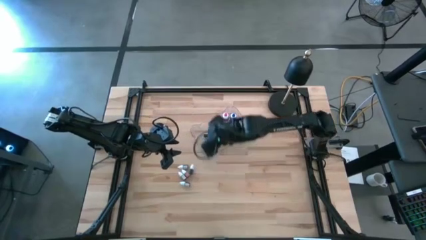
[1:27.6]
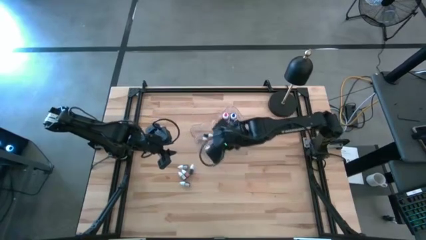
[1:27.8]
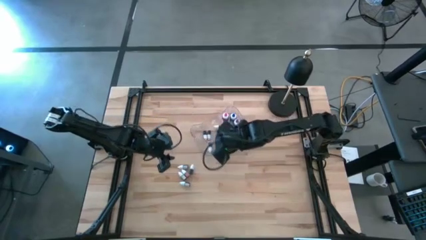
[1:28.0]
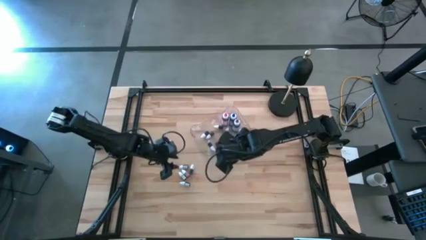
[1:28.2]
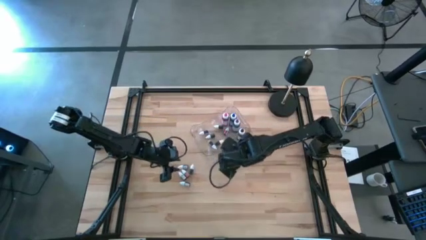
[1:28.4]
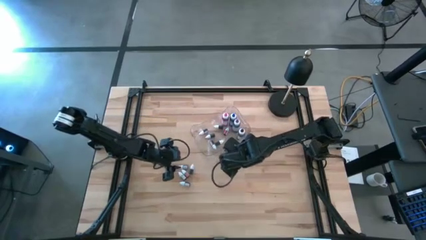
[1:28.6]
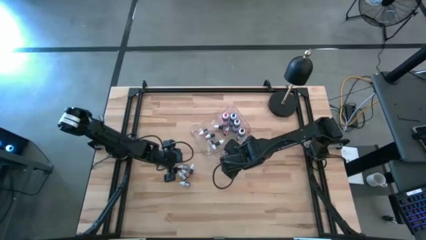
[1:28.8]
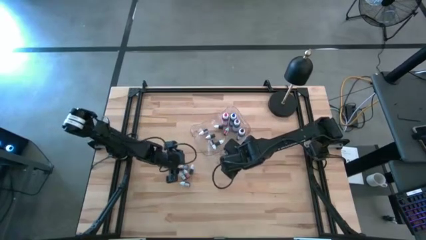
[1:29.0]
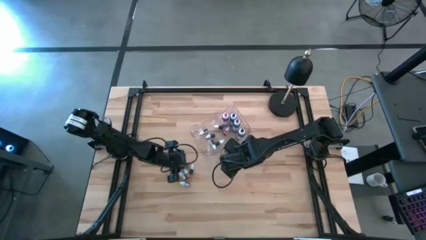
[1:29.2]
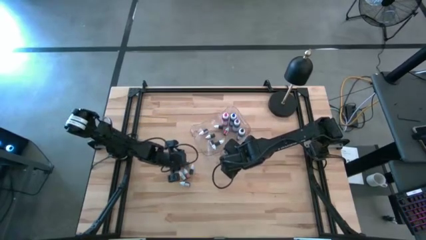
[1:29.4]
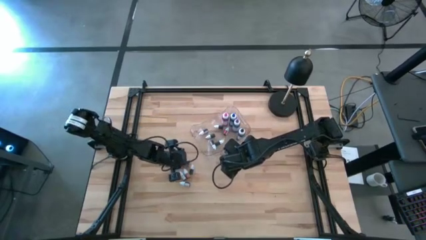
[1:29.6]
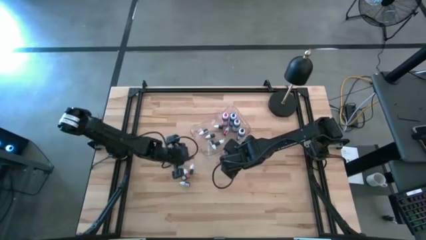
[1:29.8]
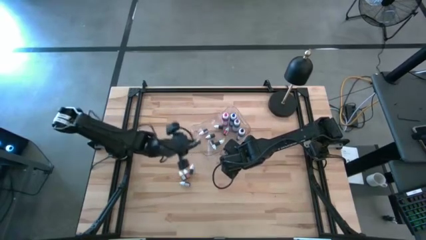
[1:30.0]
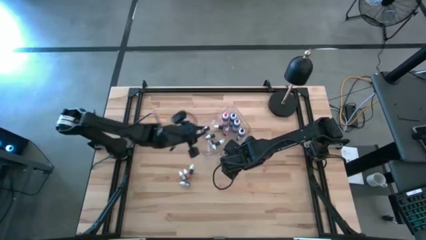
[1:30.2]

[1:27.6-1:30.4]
Task: Pick & Place food coloring
Put the left small green food coloring bottle into the transparent bin

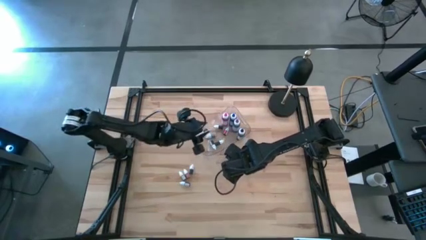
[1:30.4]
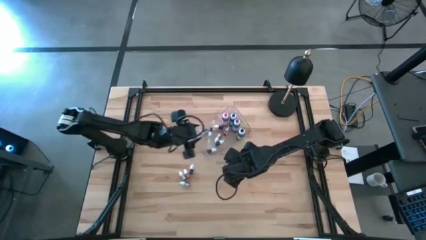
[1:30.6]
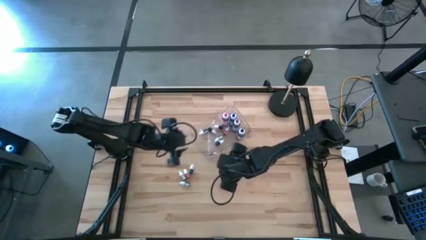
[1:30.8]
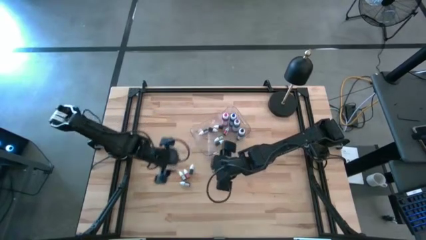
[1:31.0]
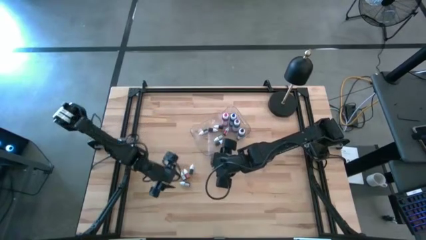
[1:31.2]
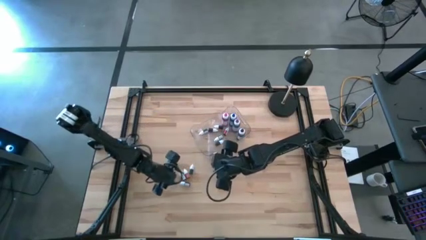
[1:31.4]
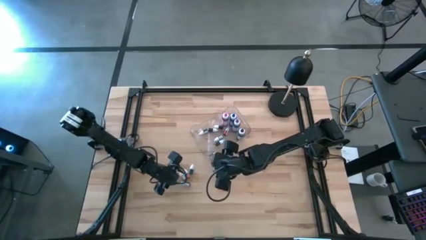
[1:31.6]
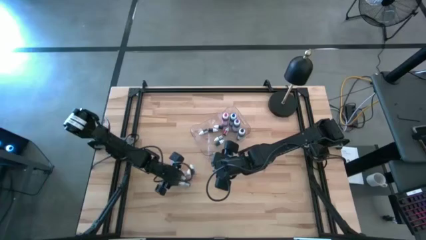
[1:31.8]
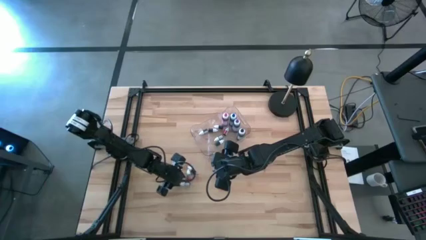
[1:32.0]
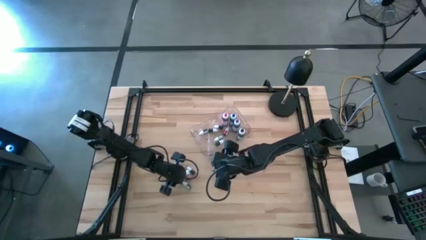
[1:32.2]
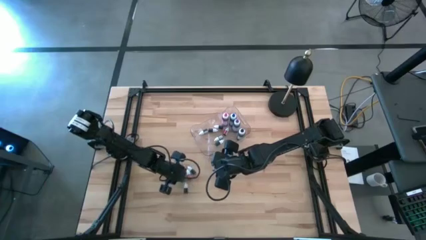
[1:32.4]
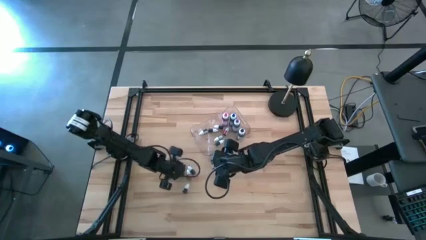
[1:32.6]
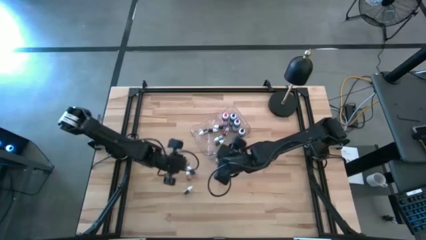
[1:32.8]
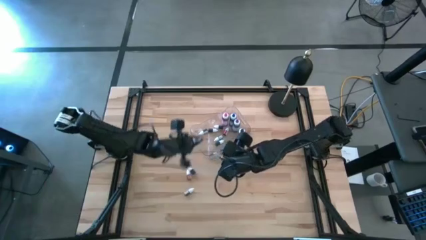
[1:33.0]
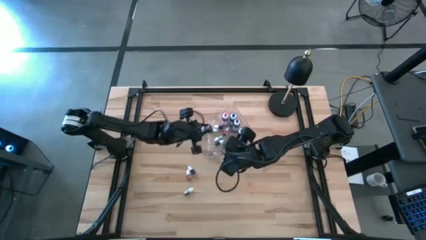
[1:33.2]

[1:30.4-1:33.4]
Put the small light green food coloring bottle into the transparent bin

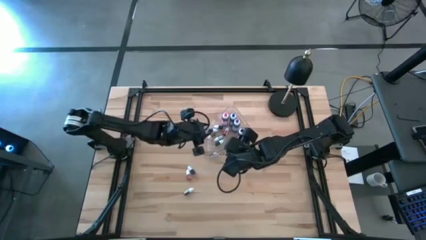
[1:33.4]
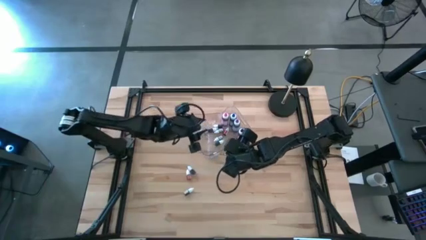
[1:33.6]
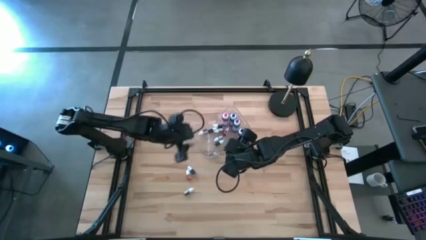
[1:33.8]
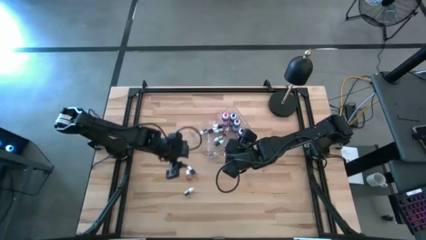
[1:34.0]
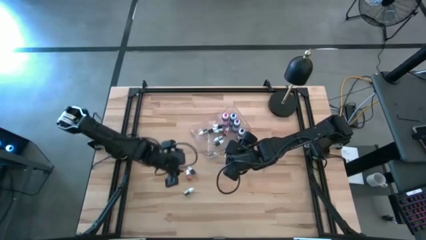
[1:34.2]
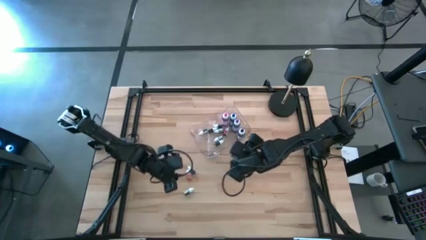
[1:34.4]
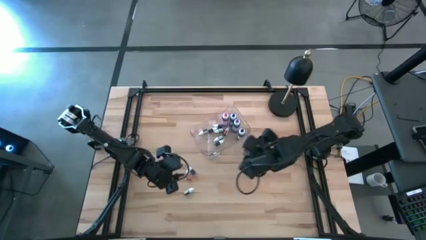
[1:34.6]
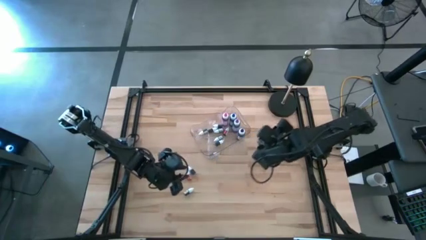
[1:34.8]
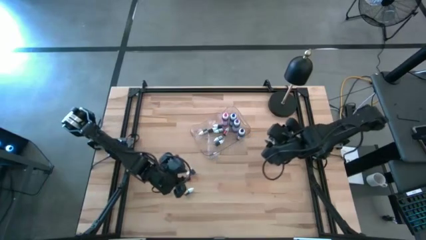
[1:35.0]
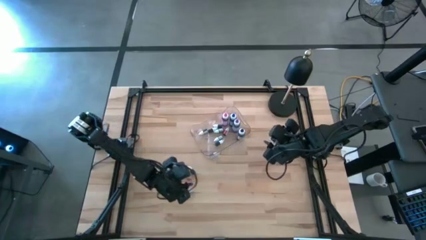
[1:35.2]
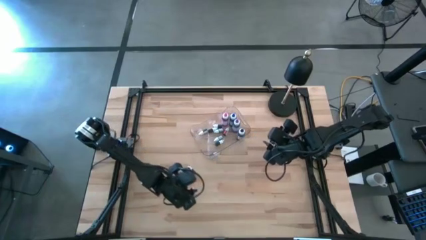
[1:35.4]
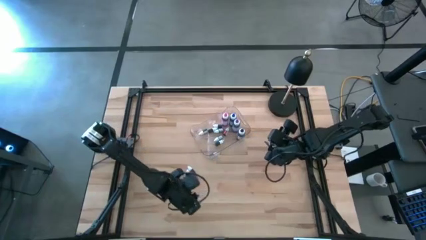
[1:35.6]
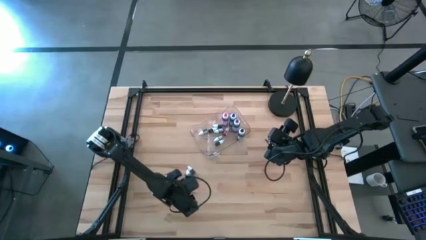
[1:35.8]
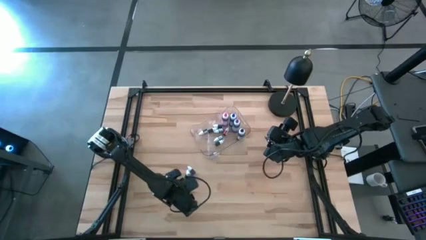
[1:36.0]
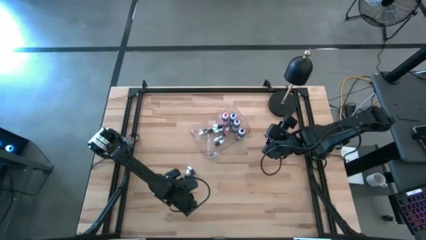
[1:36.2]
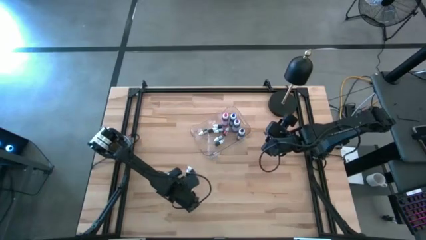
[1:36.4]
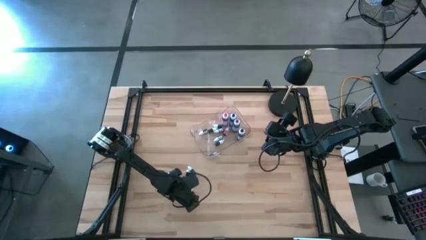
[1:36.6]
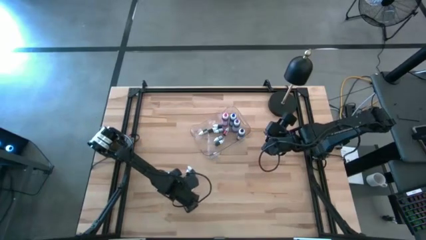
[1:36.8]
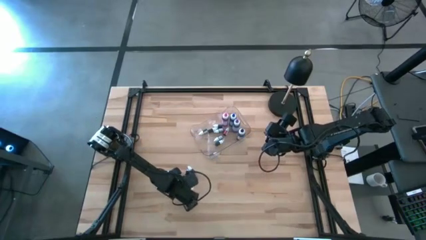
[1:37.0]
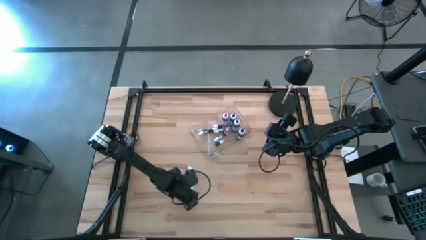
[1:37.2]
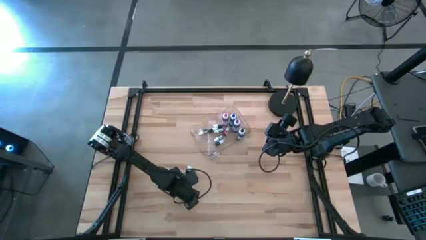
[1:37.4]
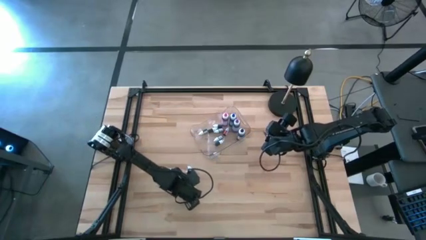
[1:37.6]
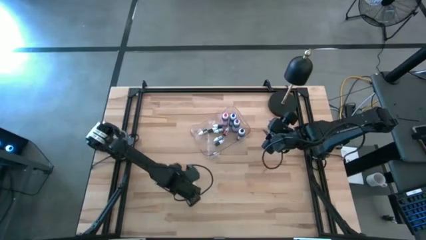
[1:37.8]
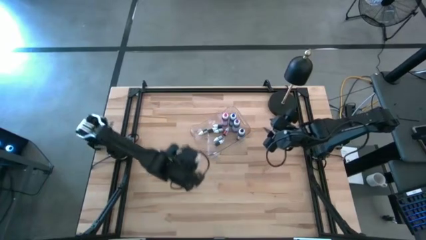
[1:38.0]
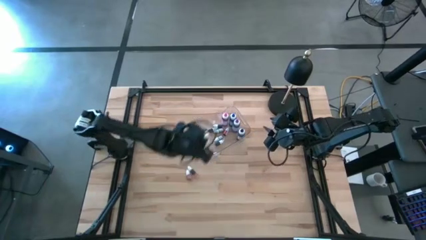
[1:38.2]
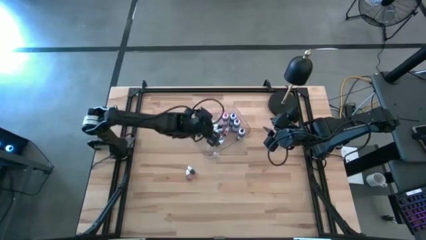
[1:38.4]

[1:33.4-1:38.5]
Put the small purple food coloring bottle into the transparent bin

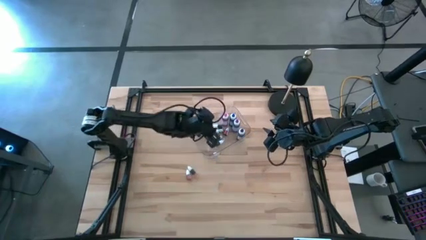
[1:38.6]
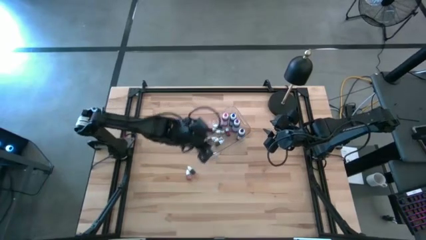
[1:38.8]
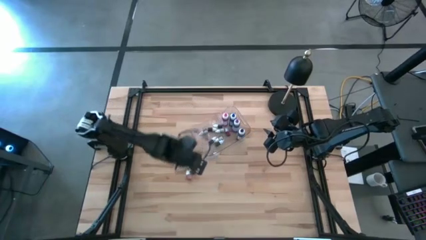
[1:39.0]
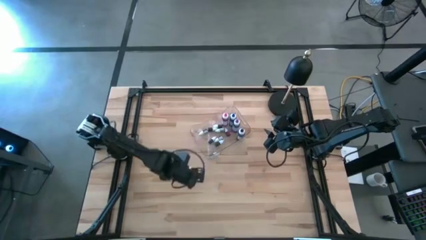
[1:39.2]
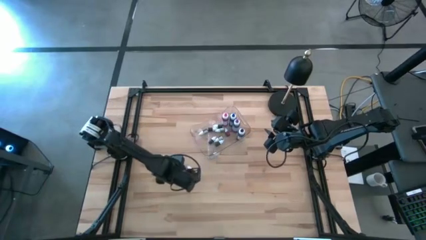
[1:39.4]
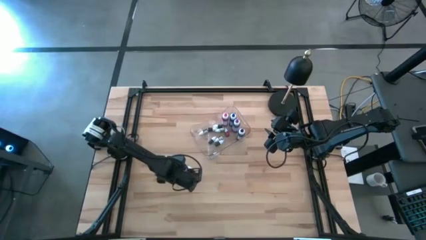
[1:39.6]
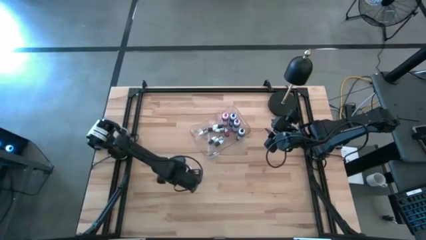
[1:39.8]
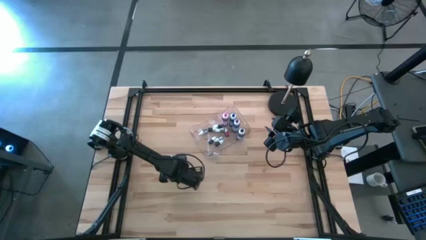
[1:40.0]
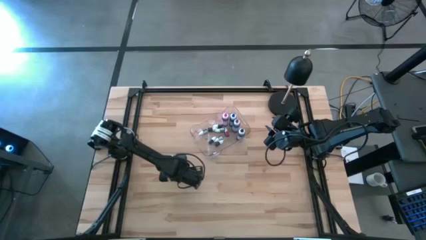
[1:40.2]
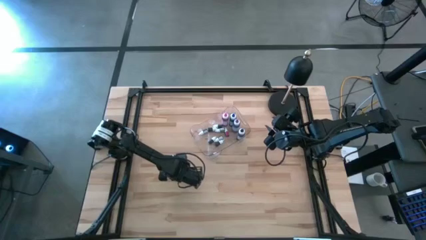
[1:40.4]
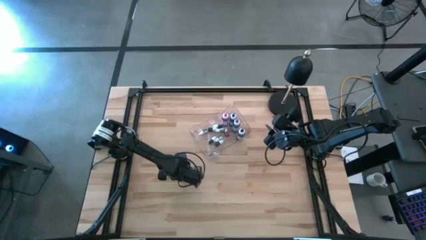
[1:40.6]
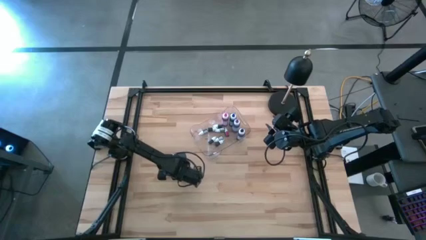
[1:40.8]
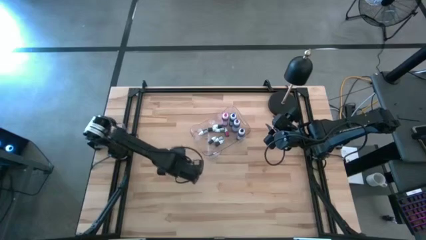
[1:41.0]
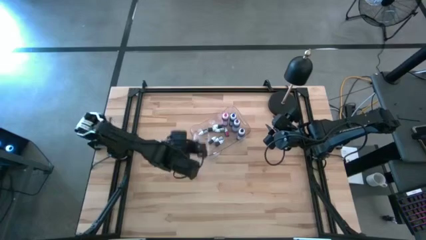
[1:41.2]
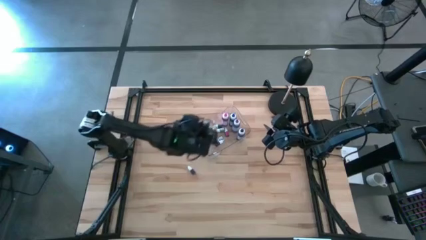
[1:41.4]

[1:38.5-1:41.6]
Put the red orange food coloring bottle into the transparent bin

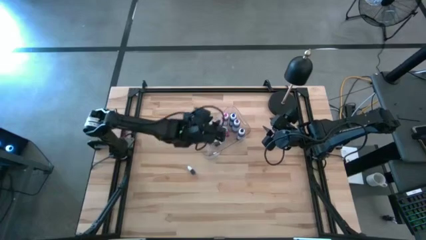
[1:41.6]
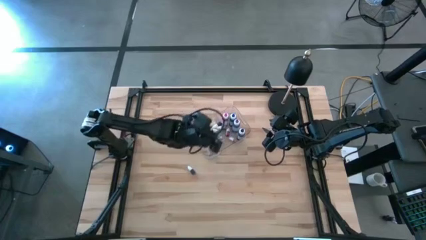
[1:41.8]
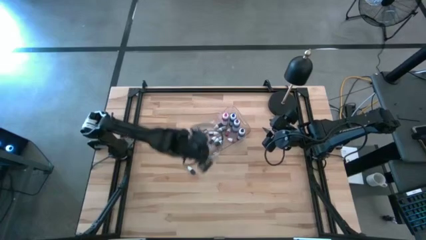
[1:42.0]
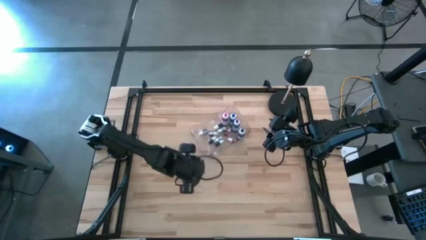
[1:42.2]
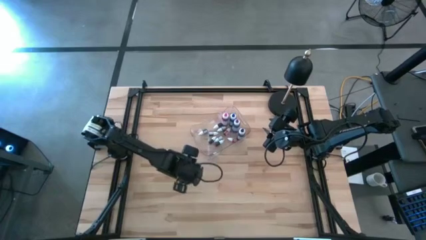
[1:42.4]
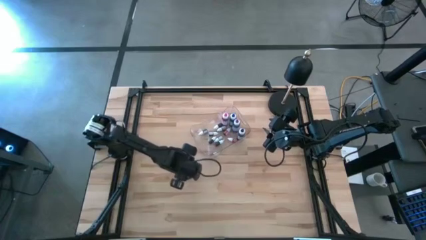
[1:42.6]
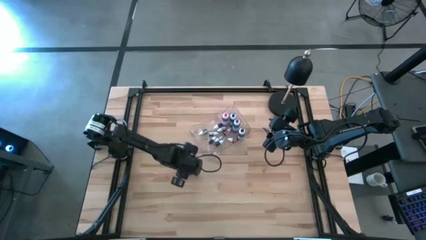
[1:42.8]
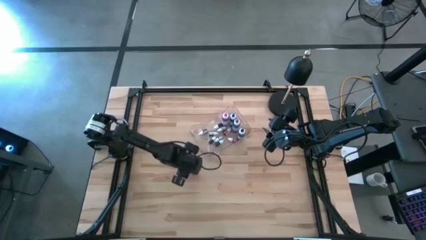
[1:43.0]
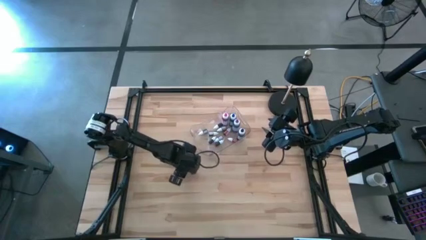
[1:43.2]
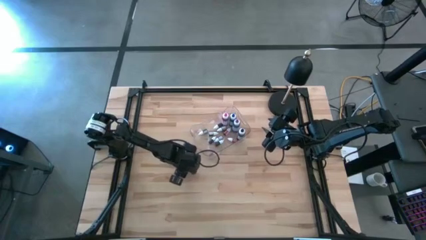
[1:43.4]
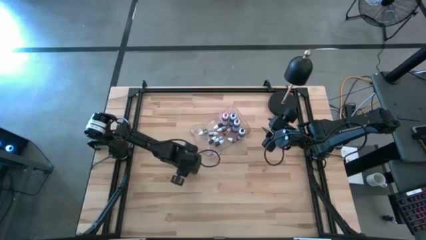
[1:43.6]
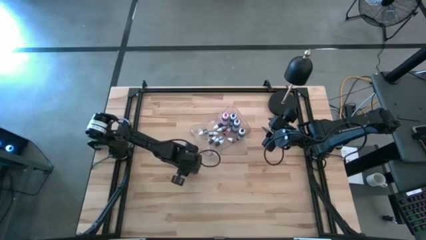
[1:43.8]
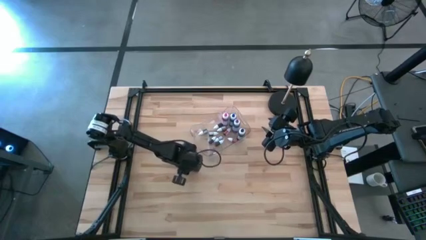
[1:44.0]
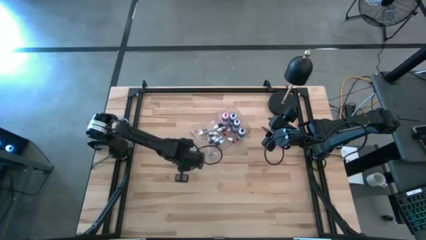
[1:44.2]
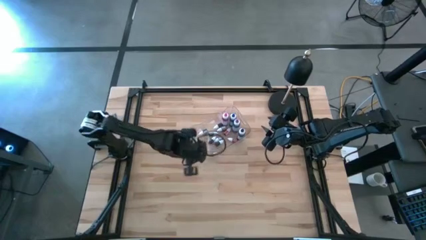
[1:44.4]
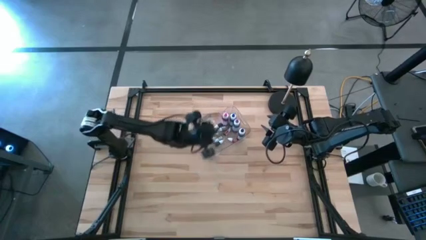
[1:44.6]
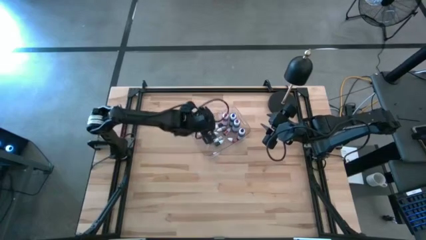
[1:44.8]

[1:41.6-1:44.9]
Put the small green food coloring bottle into the transparent bin
